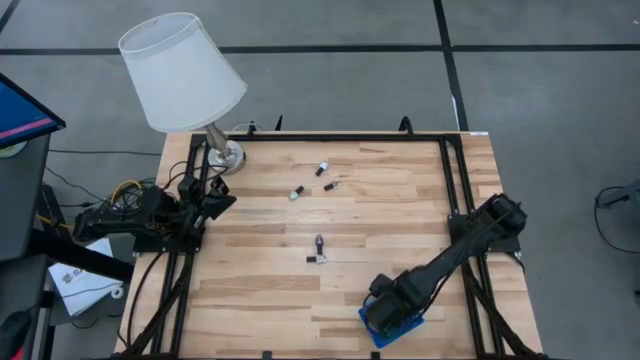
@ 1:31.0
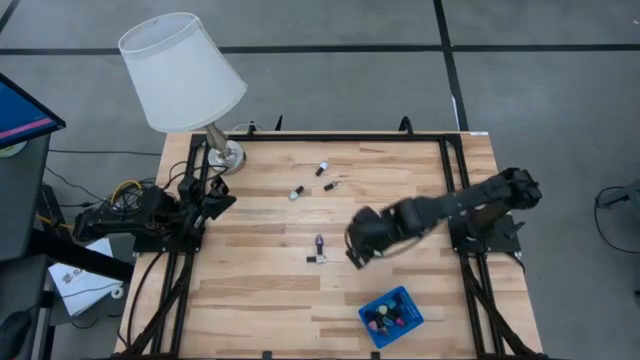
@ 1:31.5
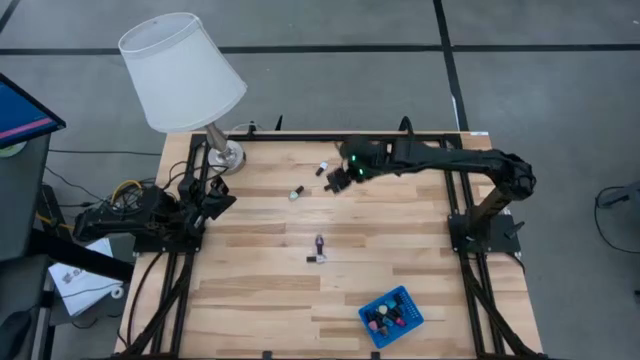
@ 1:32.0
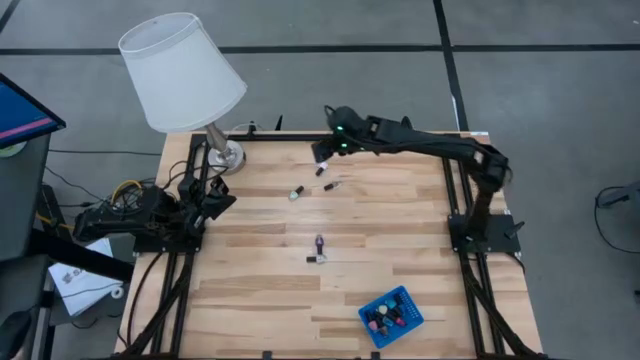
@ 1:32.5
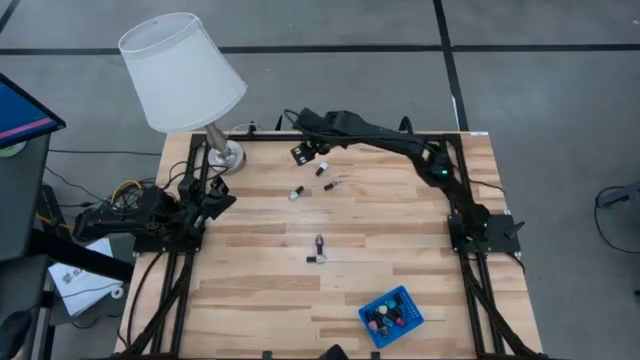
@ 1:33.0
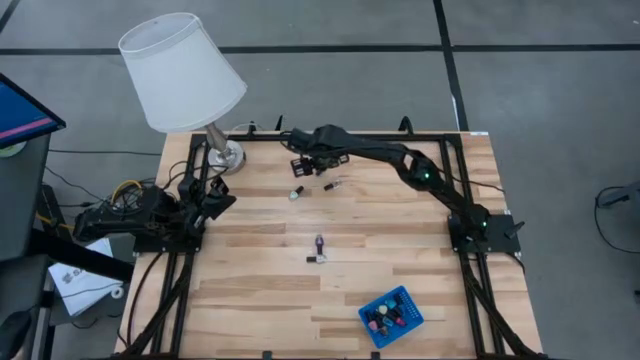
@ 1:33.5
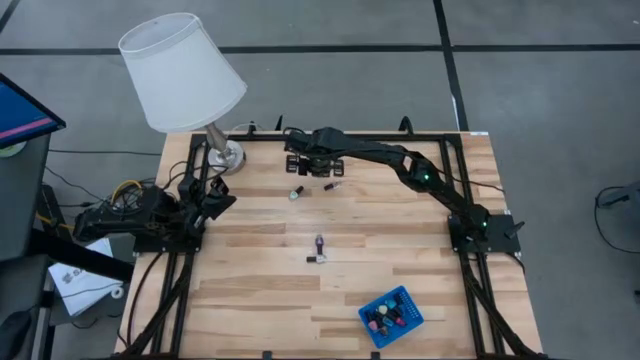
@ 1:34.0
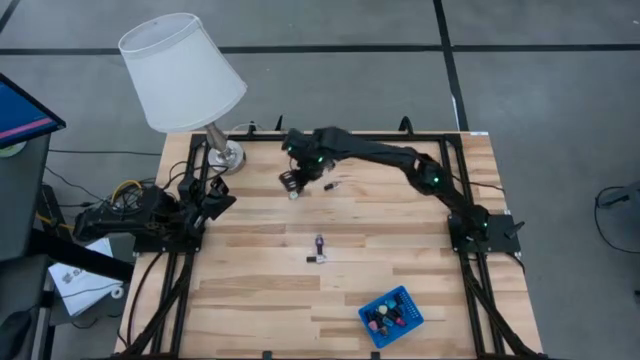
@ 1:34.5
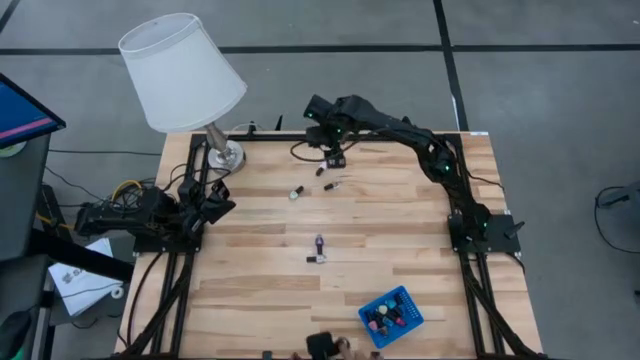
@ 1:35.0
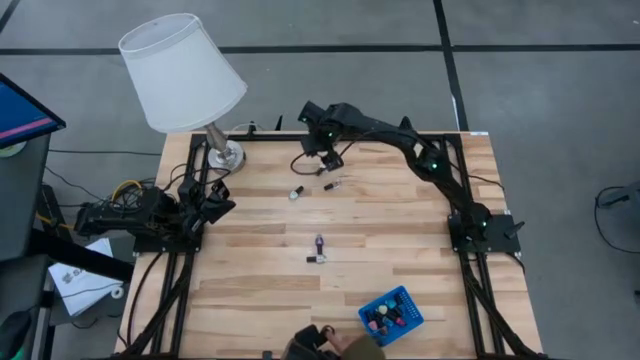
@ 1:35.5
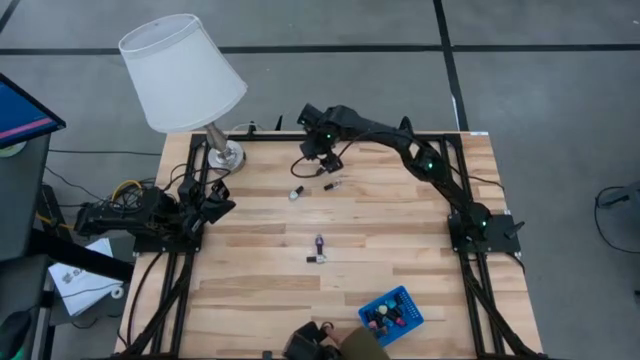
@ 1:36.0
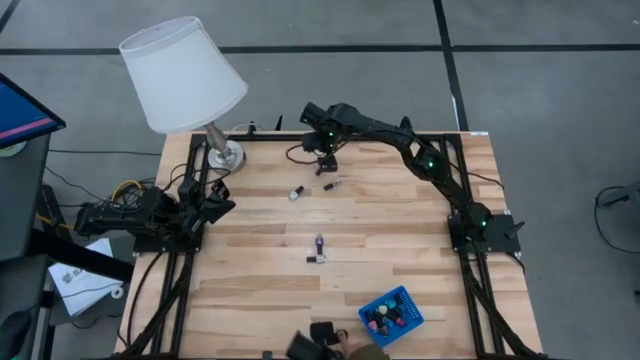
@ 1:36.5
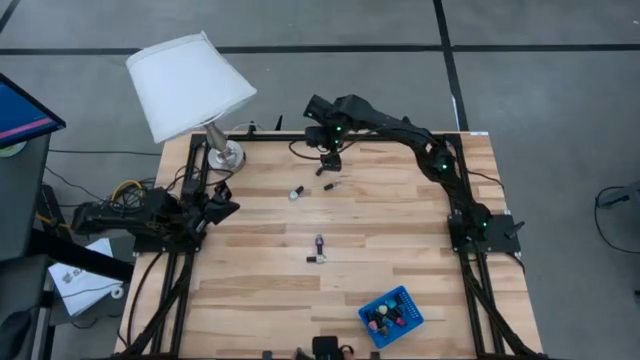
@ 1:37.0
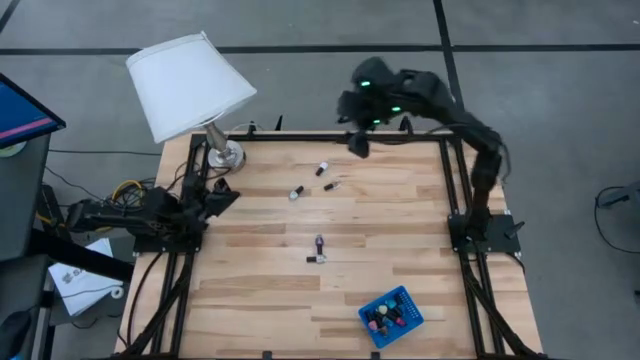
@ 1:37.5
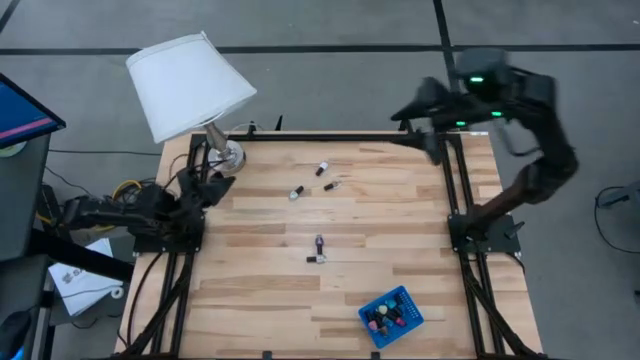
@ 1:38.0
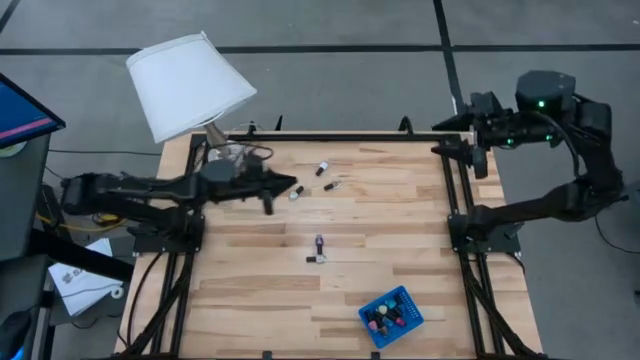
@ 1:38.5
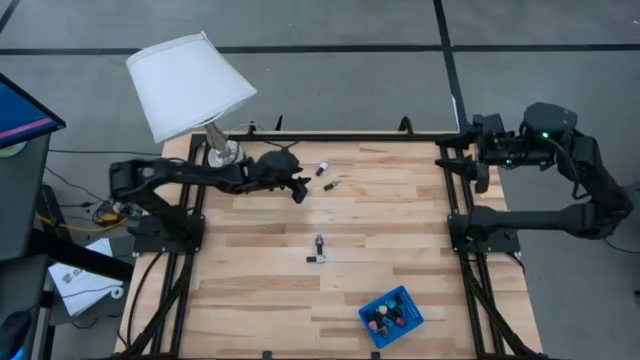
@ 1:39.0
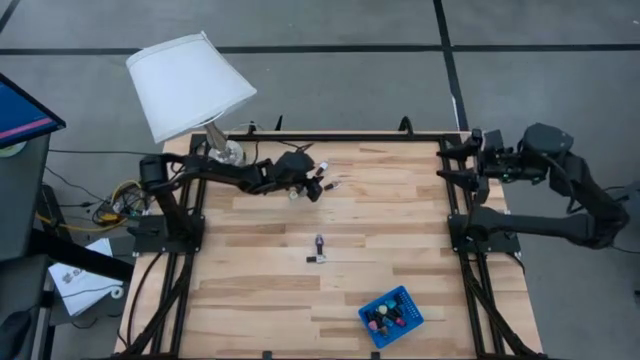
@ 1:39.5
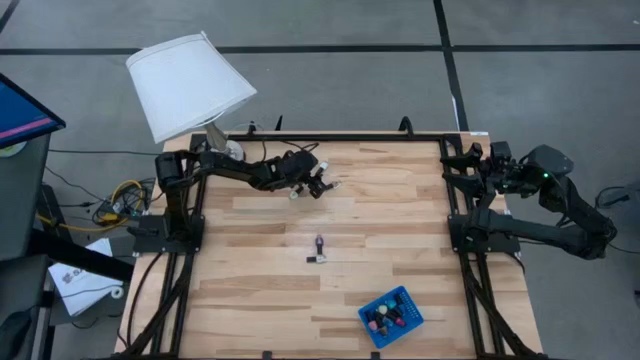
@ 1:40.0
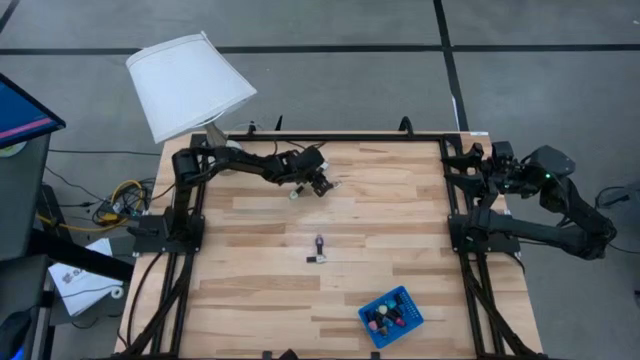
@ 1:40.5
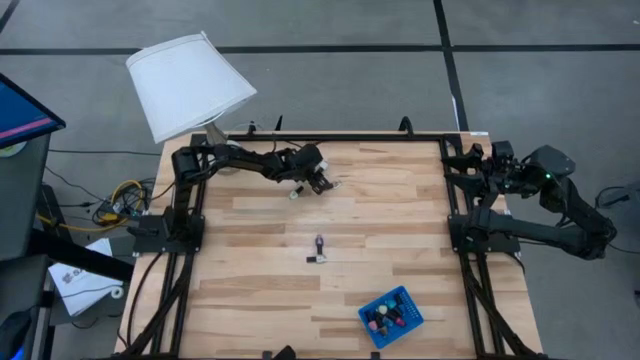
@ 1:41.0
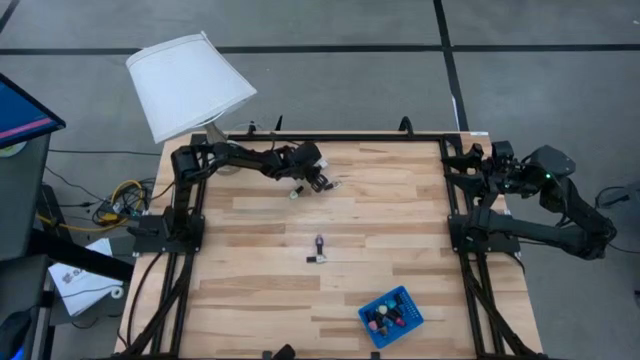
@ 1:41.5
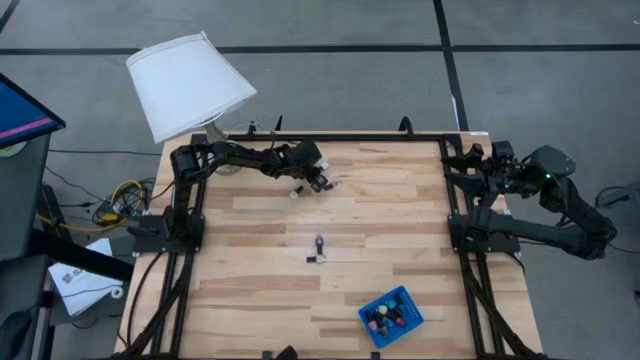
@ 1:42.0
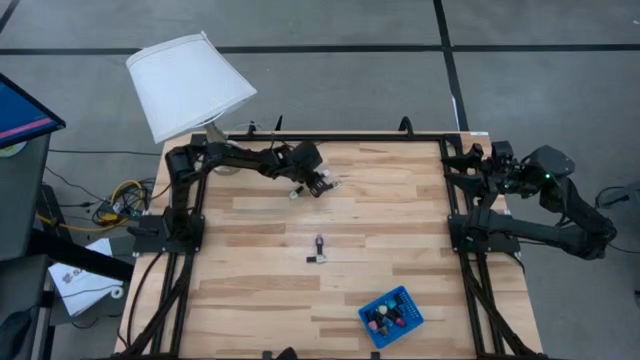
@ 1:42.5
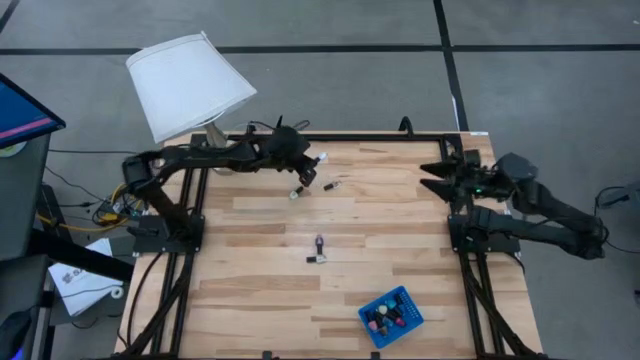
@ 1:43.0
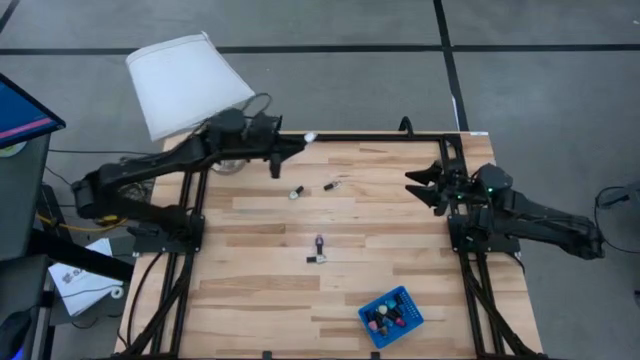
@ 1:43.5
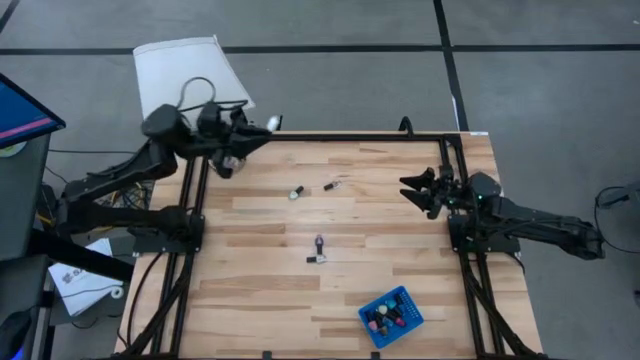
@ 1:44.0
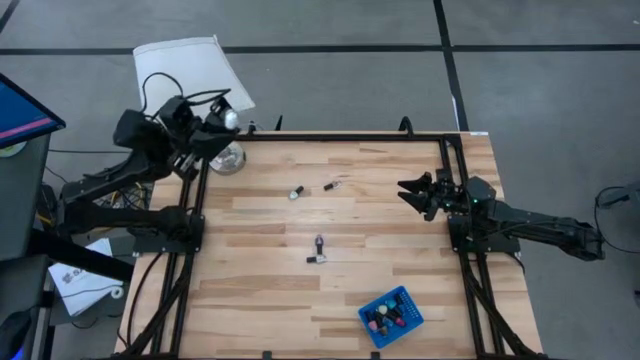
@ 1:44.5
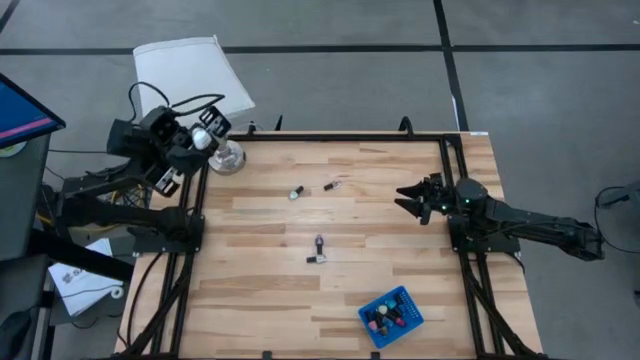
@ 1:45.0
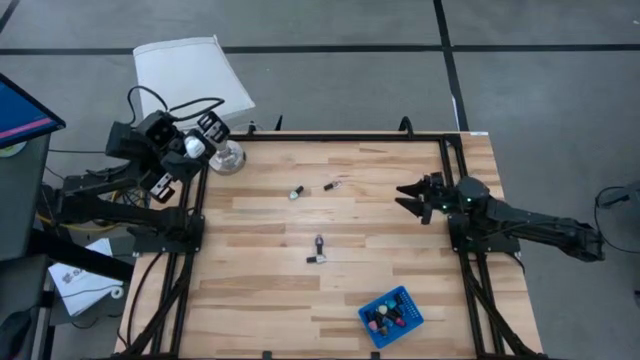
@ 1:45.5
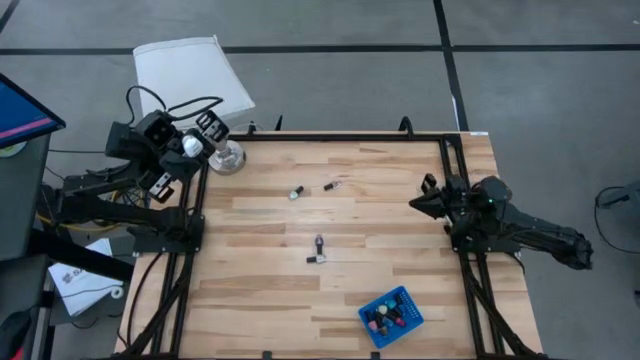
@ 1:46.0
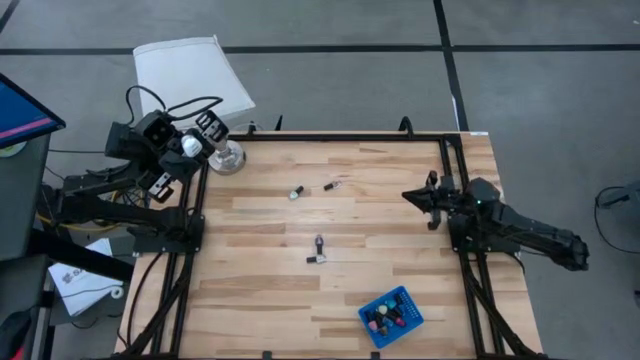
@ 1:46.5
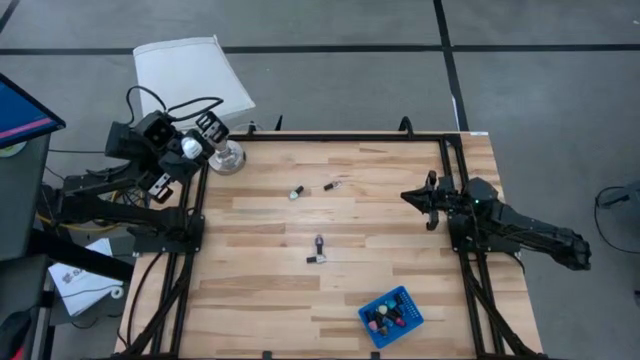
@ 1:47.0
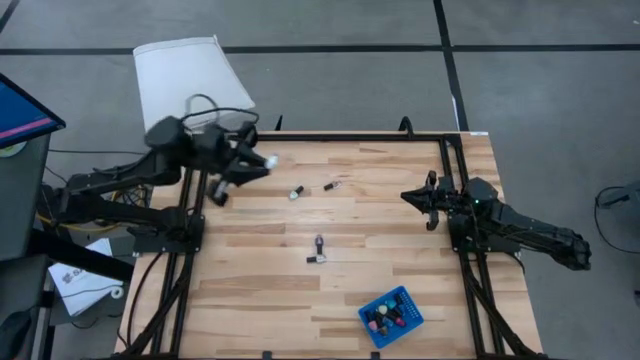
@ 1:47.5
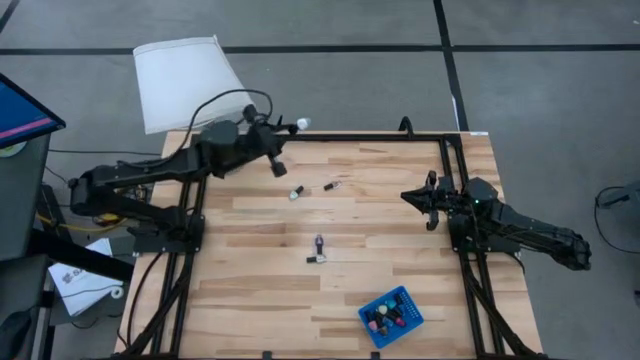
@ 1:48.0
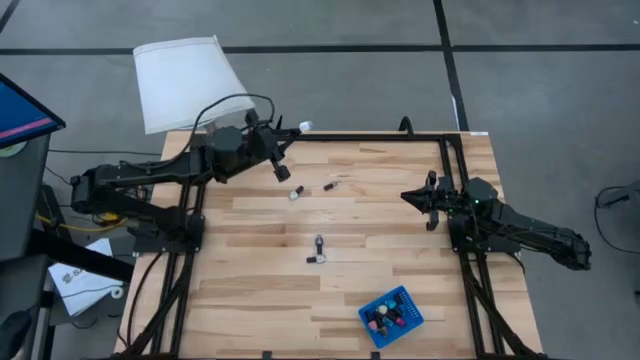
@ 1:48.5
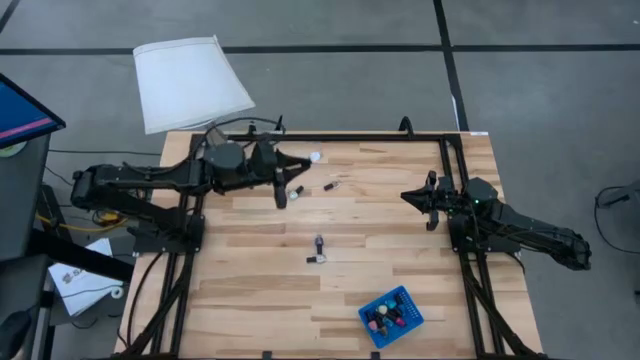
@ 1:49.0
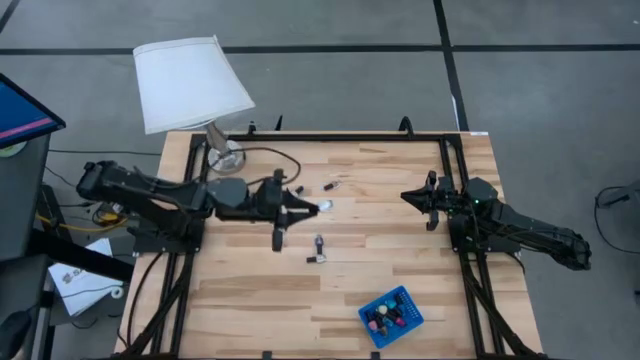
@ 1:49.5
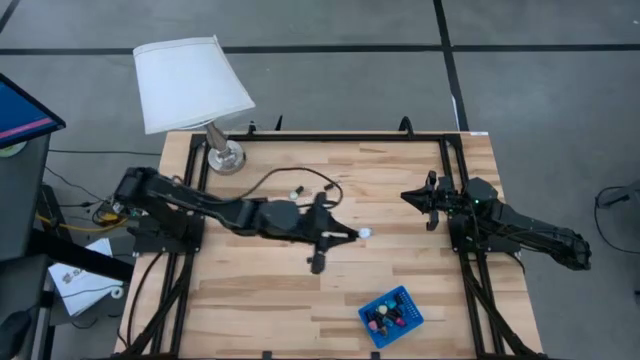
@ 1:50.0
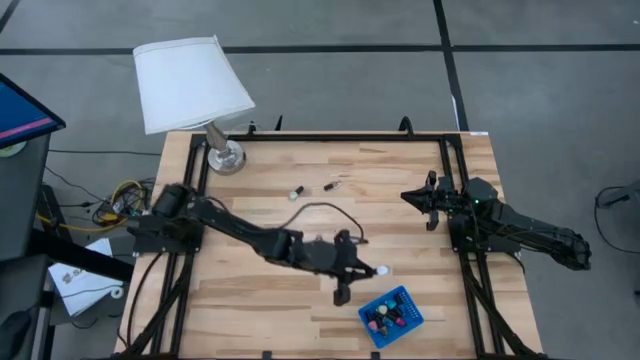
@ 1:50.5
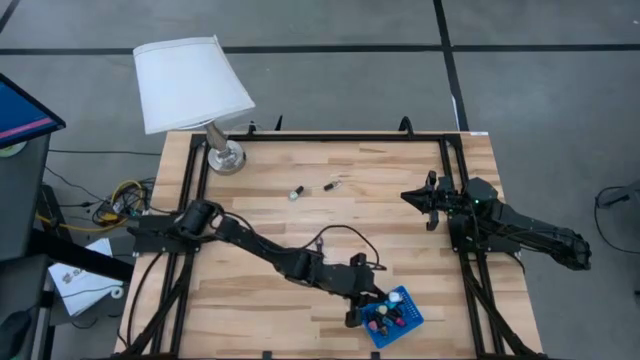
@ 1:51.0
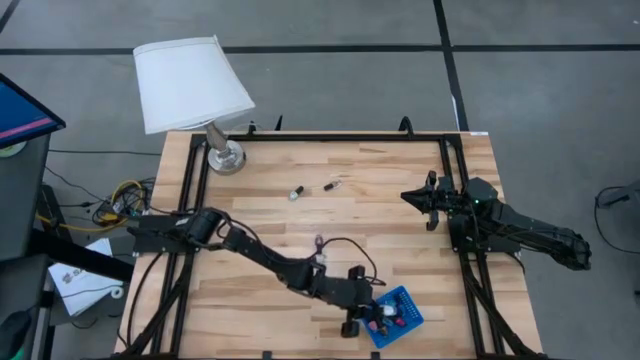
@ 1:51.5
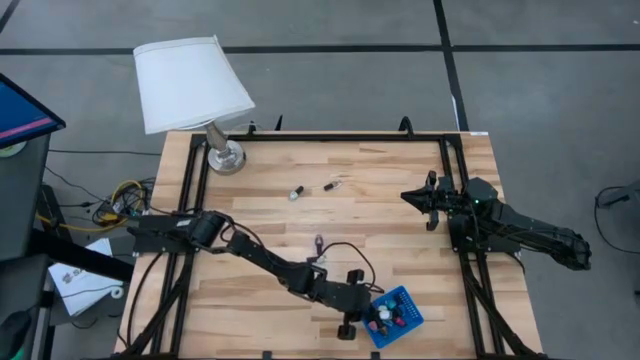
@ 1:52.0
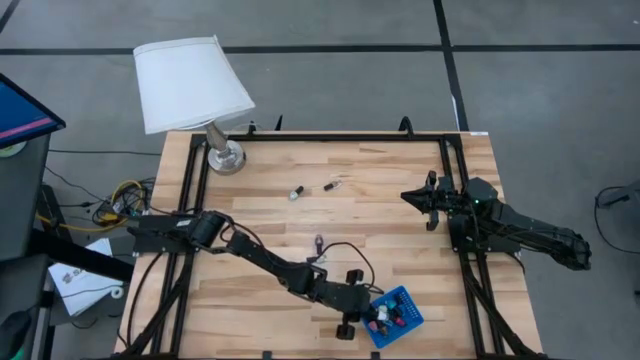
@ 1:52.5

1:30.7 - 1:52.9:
Task: Pick & Place Nail Polish
Put the top white nail polish into the blue bin
